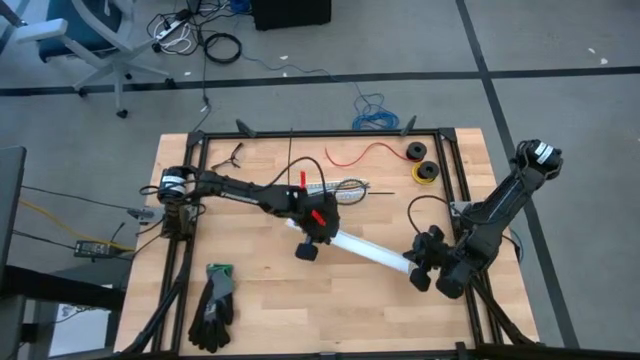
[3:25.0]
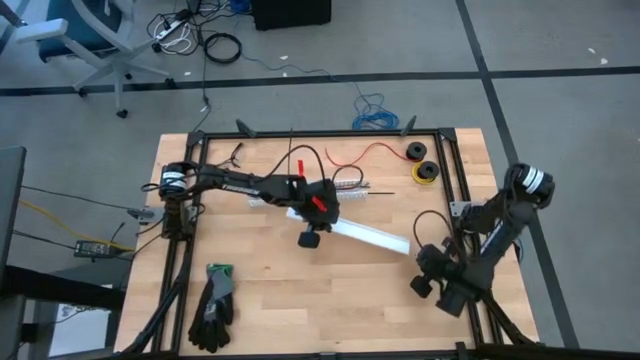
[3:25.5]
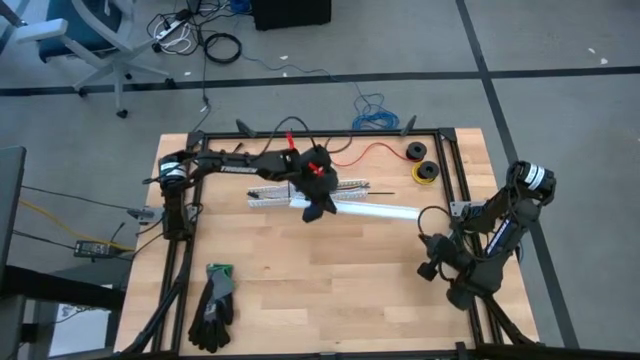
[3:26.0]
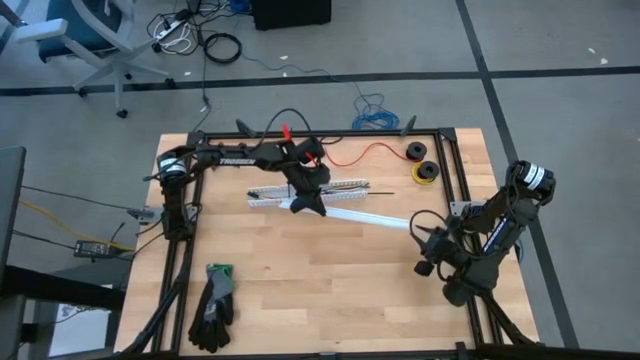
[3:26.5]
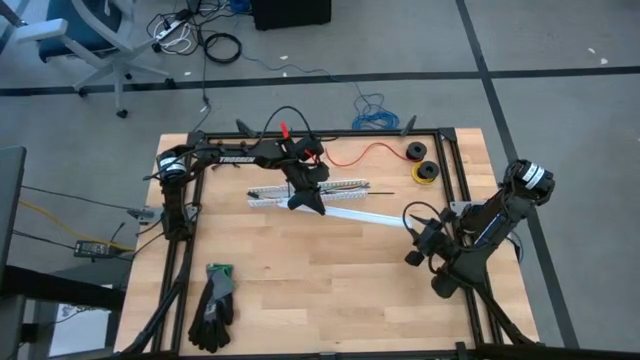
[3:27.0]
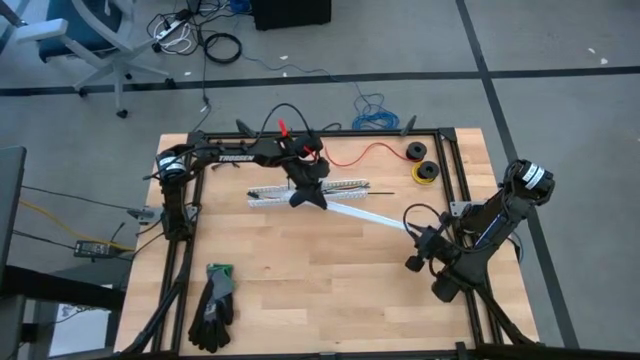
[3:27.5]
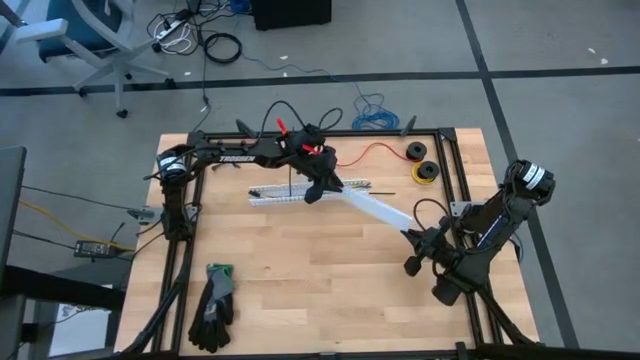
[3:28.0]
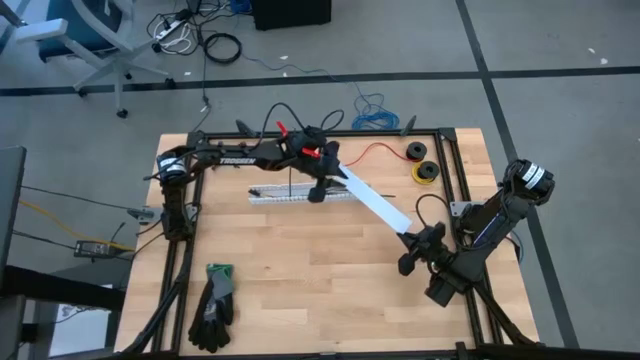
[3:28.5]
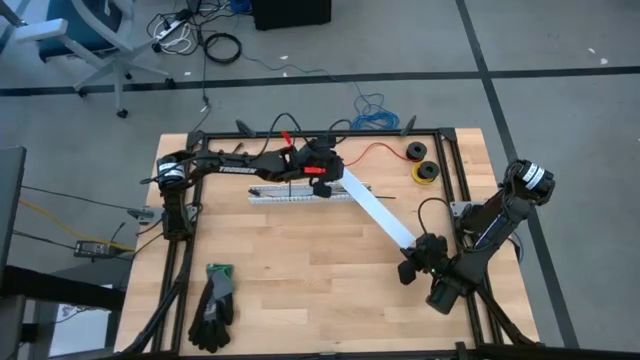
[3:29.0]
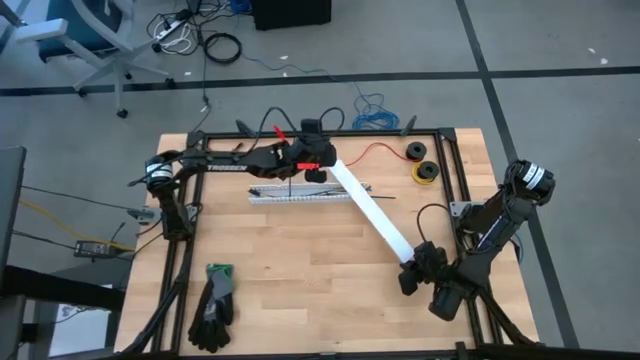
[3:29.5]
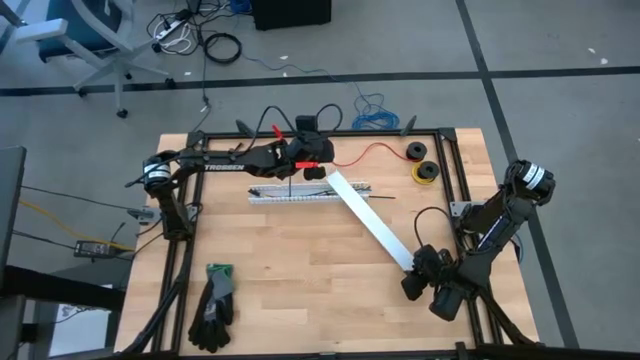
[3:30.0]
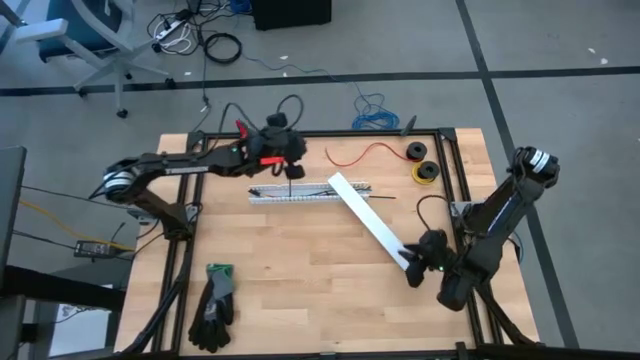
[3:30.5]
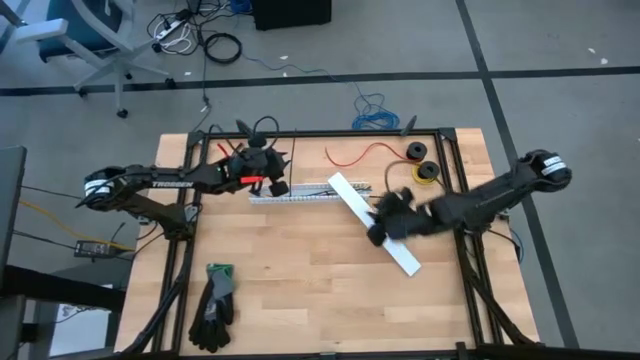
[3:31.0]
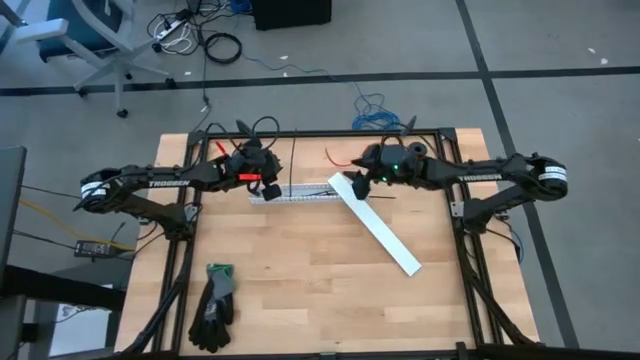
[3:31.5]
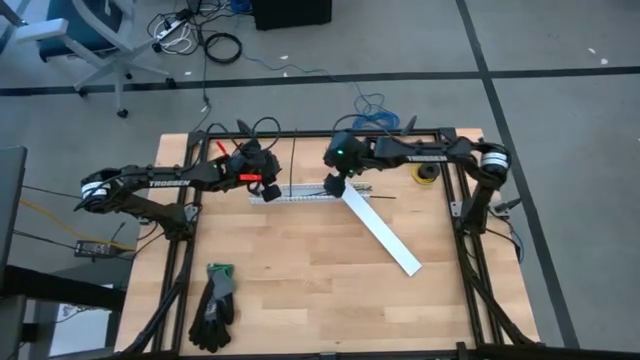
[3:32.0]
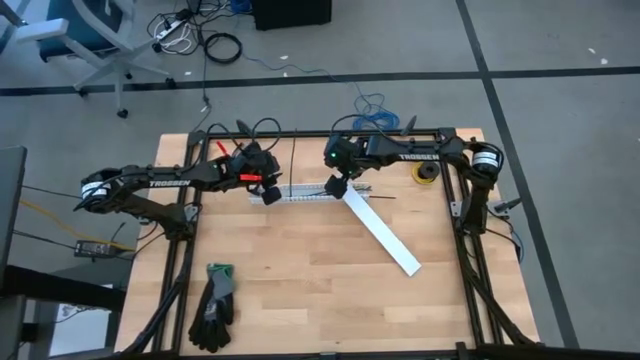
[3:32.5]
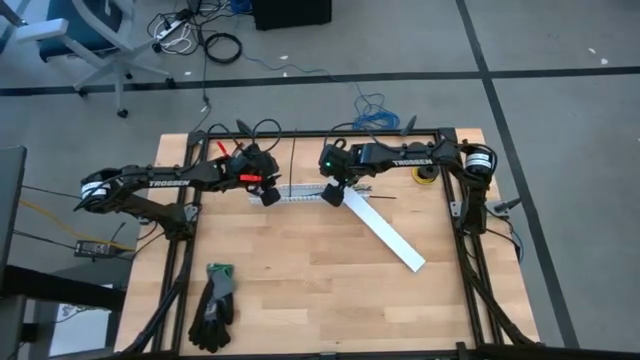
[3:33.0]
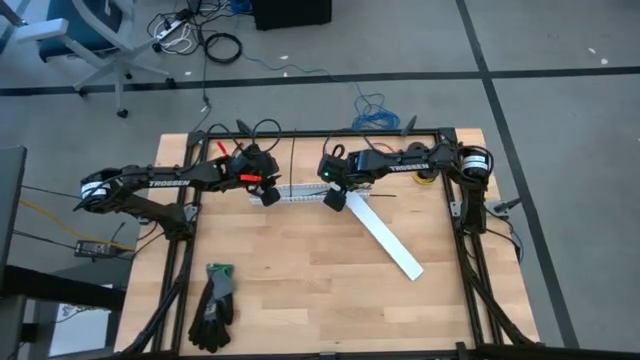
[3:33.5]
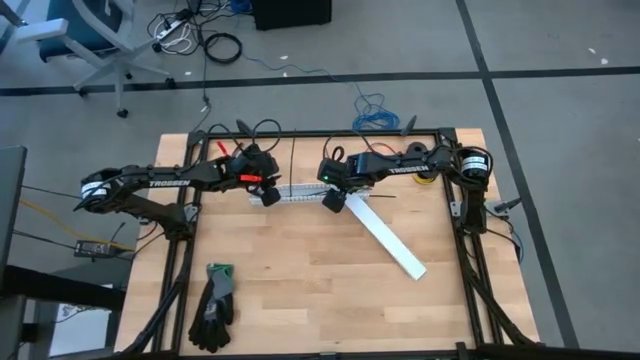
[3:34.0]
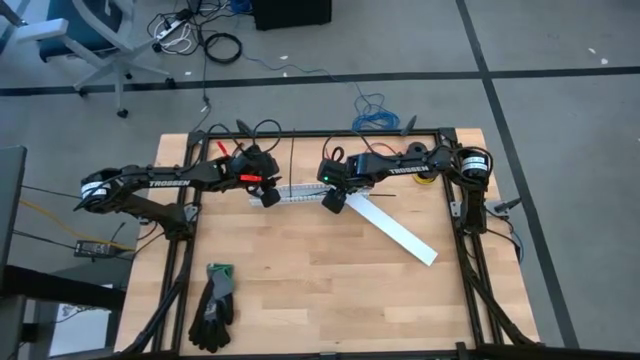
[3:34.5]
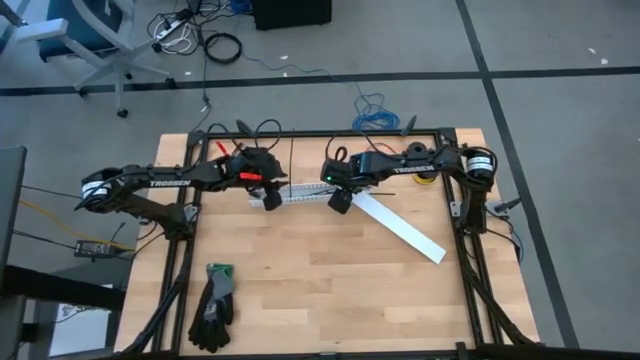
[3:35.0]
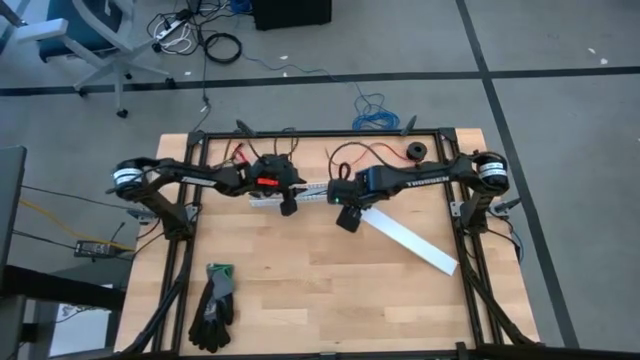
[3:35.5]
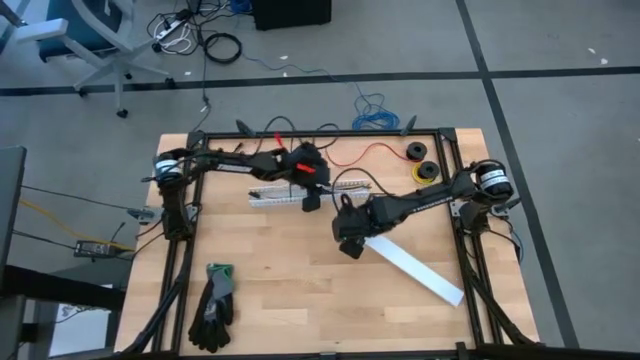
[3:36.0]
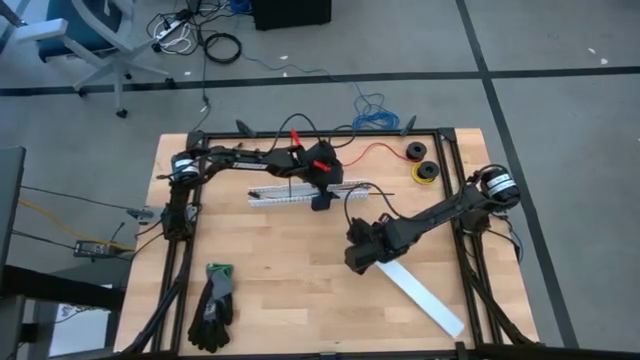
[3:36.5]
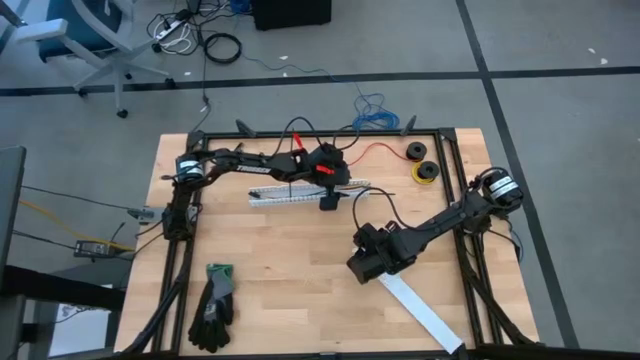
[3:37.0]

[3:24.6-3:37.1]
Task: Ziptie cables
Close the white cable duct

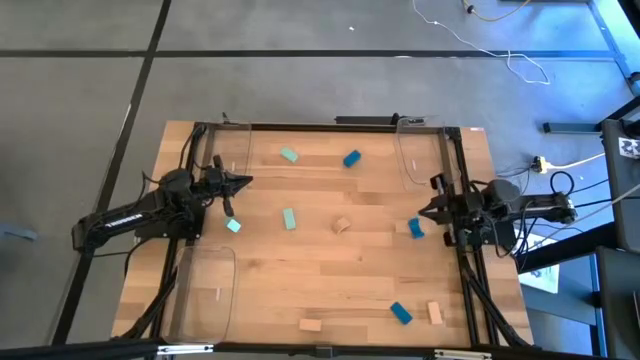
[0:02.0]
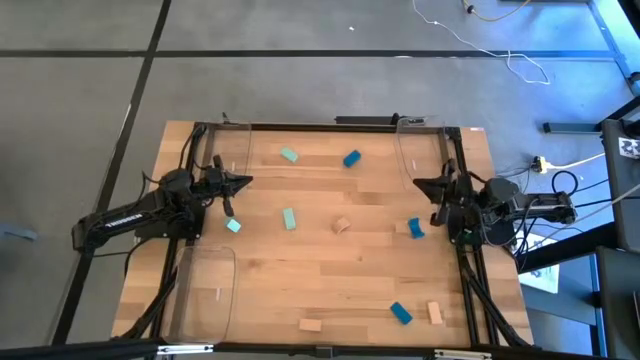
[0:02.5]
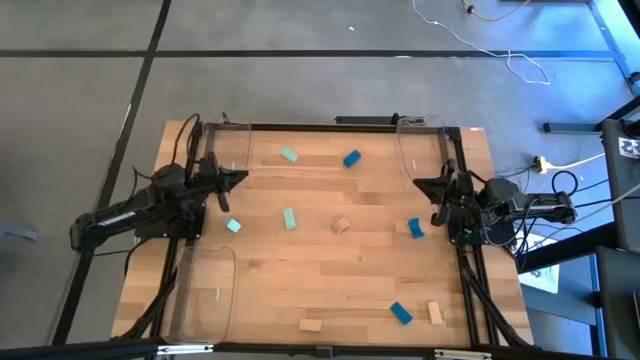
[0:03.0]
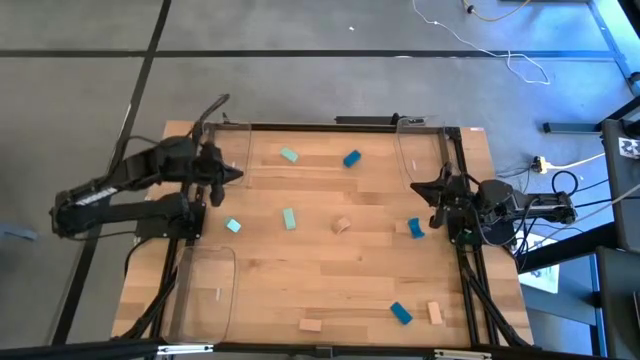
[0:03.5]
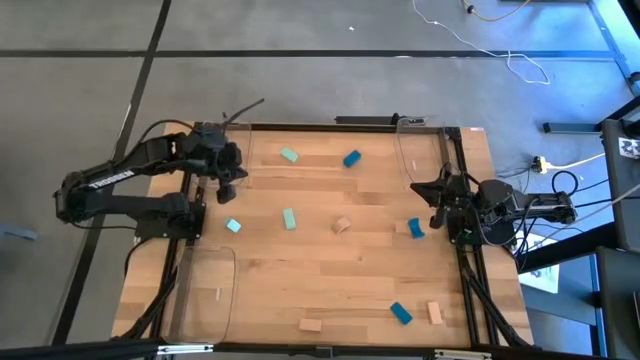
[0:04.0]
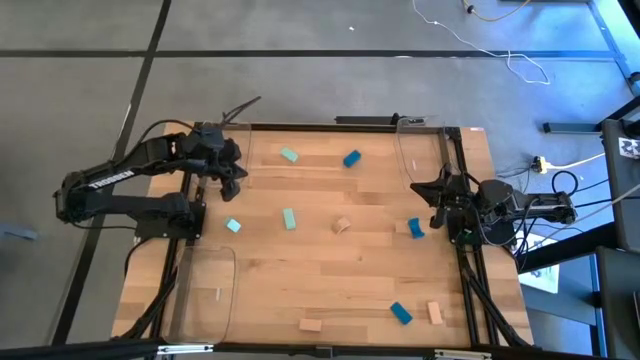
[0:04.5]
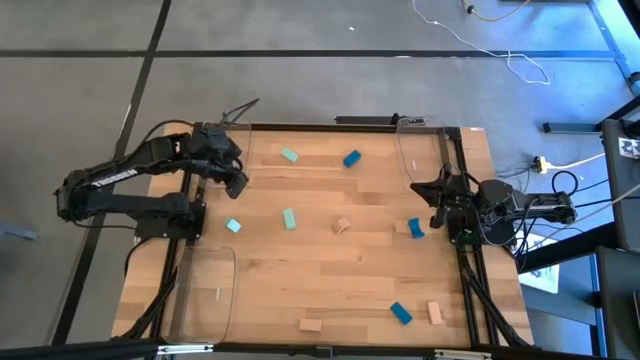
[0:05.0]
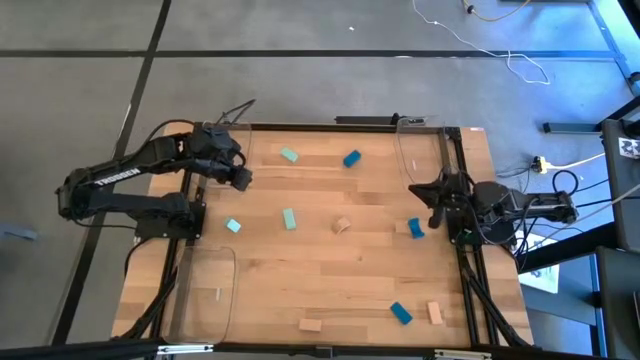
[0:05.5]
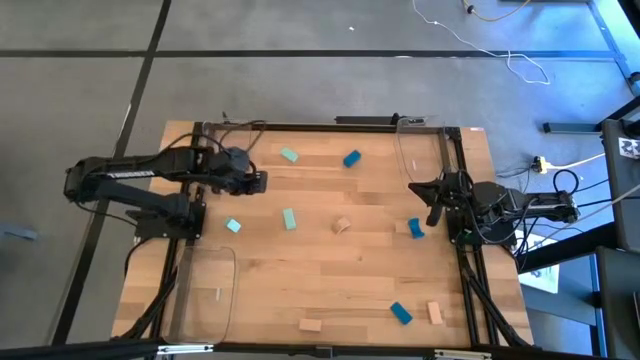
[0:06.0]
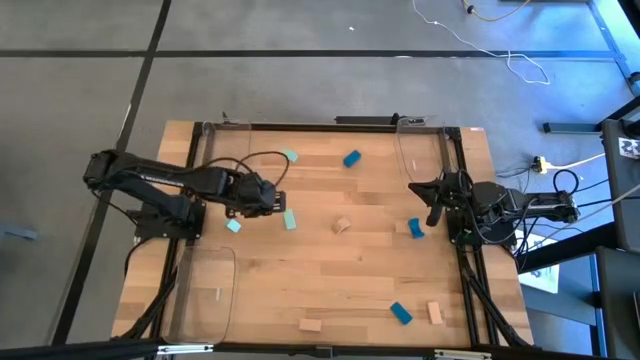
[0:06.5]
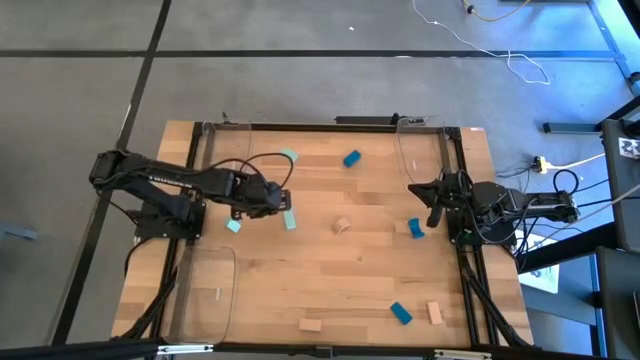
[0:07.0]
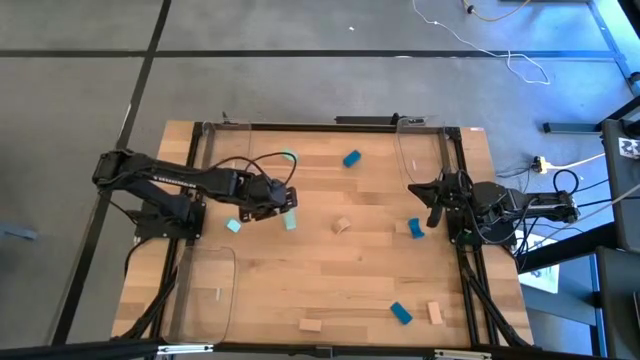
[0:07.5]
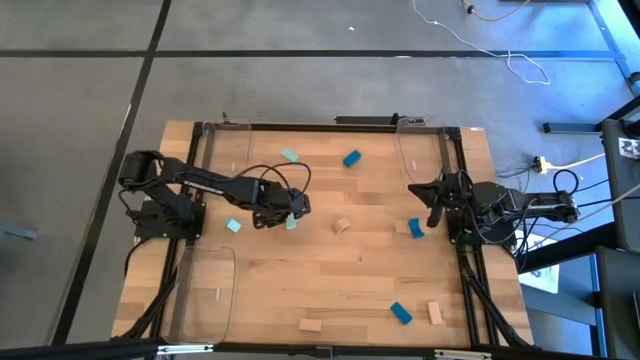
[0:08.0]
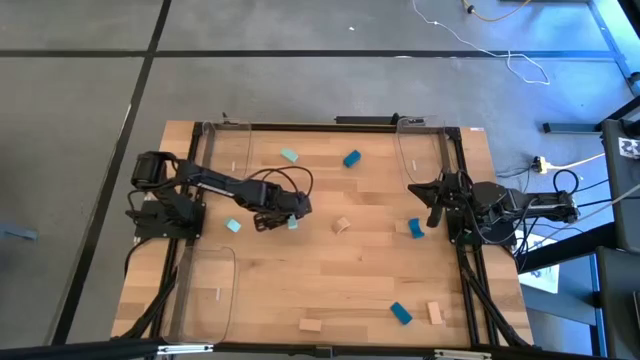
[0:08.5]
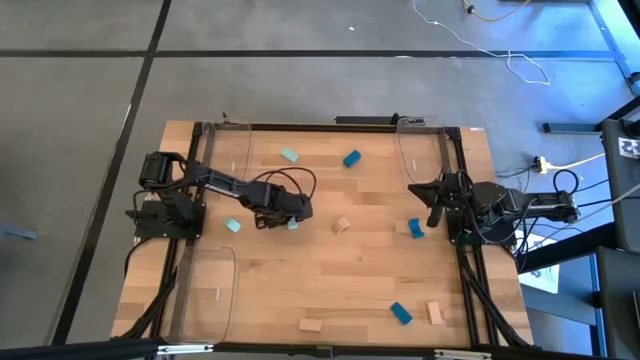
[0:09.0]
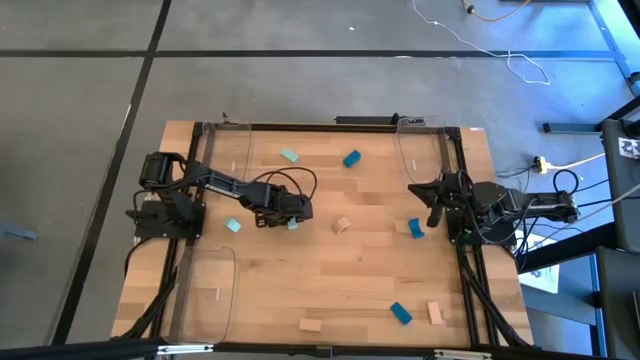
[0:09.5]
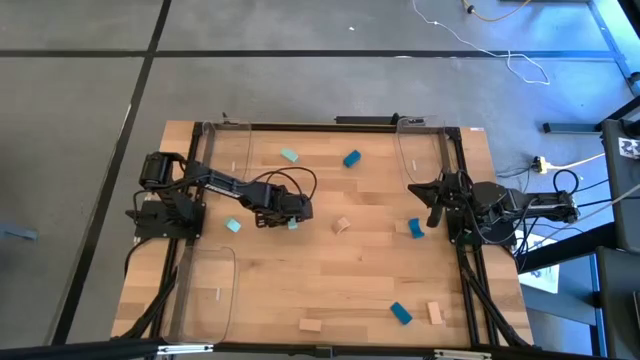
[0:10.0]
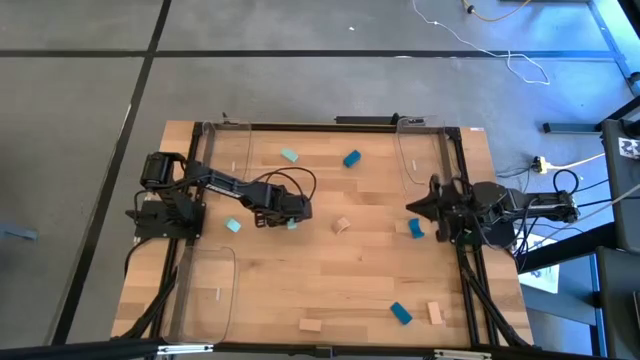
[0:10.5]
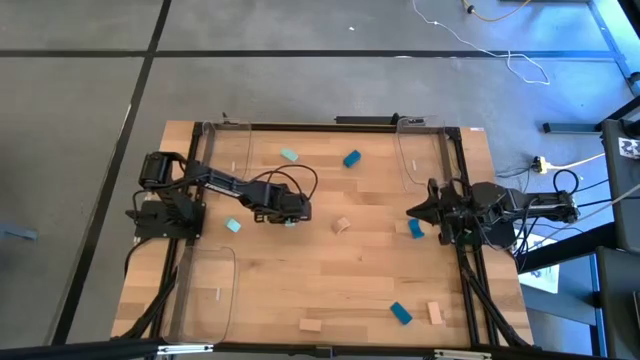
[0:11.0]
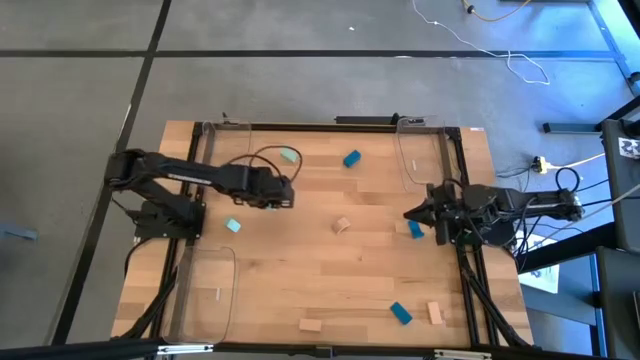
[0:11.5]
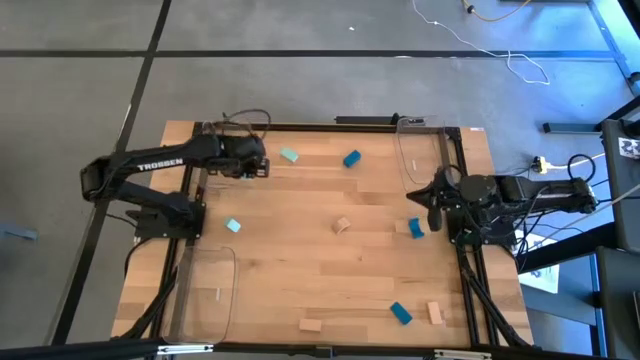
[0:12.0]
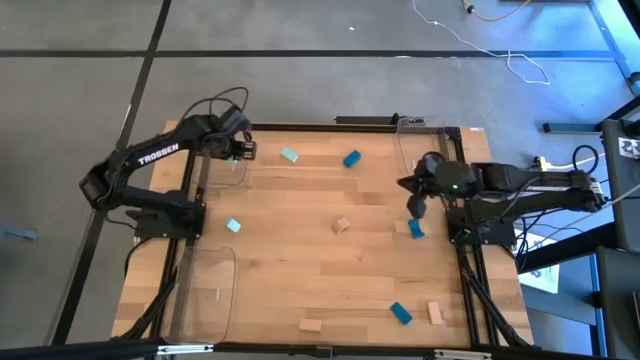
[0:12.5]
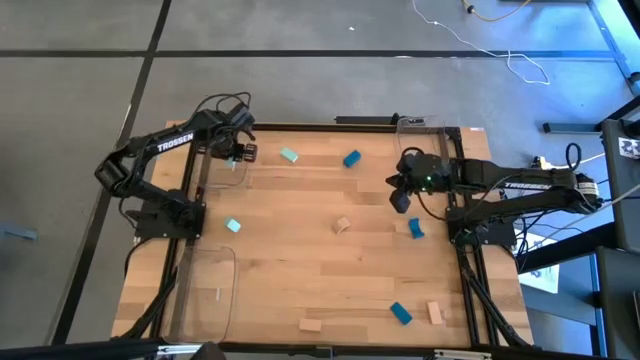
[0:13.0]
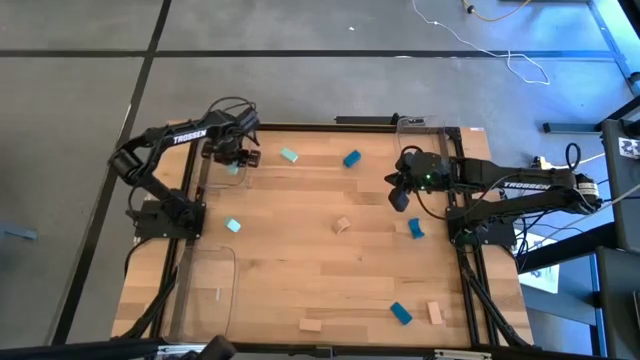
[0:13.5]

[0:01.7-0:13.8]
Task: Sort & place blocks by color
Put the bottom right light blue block into the top left transparent bin
